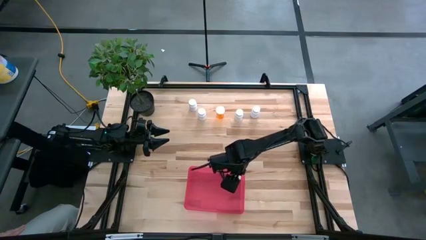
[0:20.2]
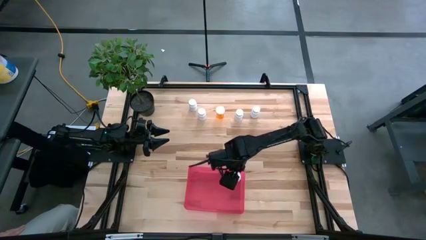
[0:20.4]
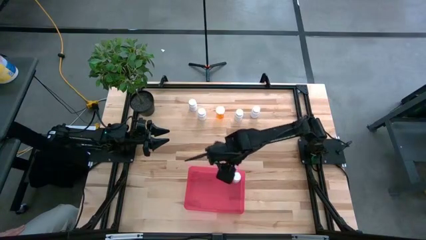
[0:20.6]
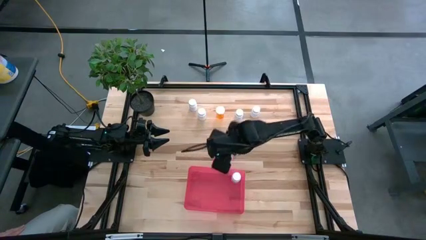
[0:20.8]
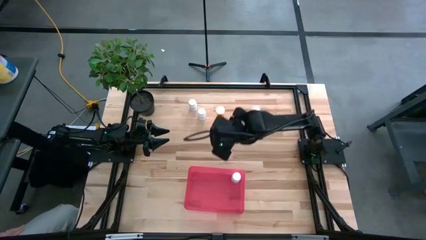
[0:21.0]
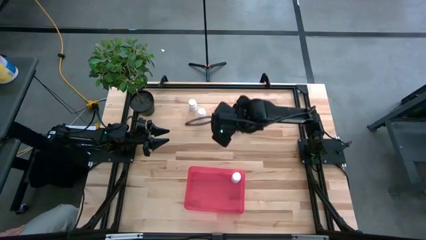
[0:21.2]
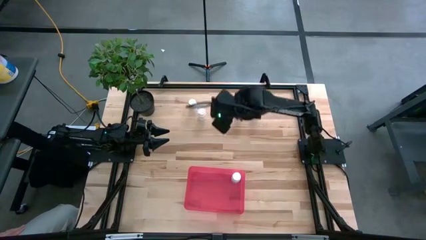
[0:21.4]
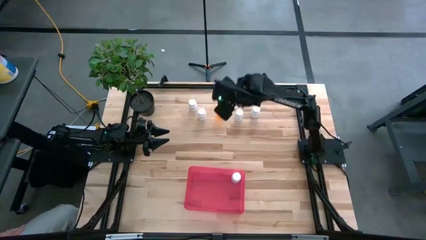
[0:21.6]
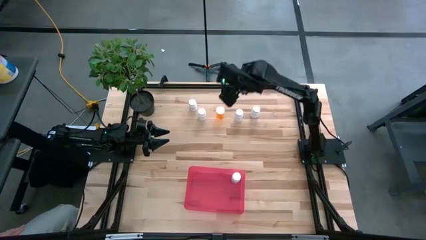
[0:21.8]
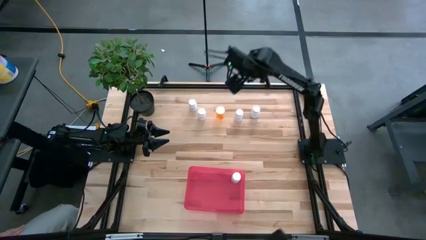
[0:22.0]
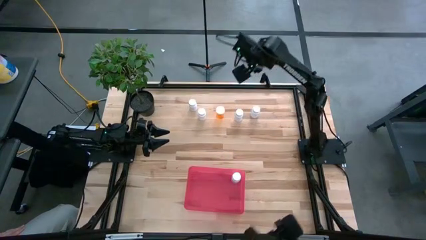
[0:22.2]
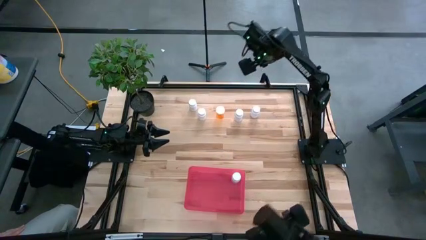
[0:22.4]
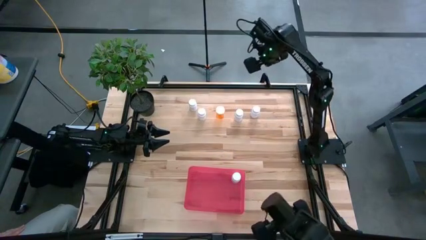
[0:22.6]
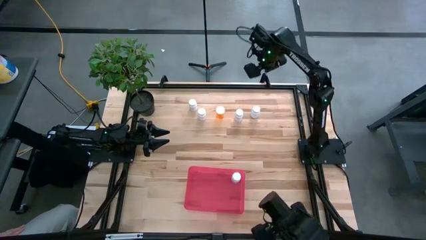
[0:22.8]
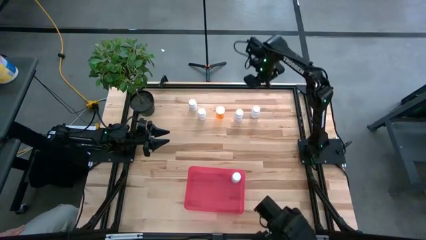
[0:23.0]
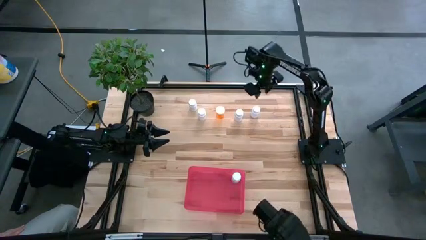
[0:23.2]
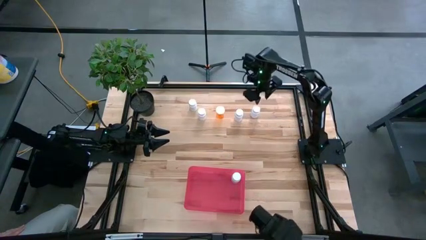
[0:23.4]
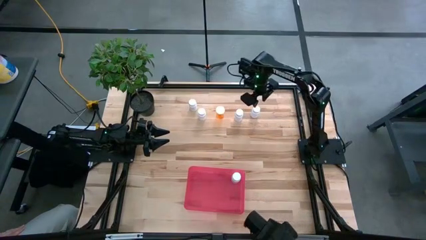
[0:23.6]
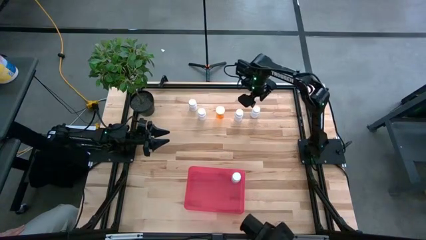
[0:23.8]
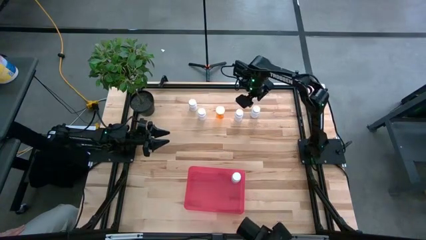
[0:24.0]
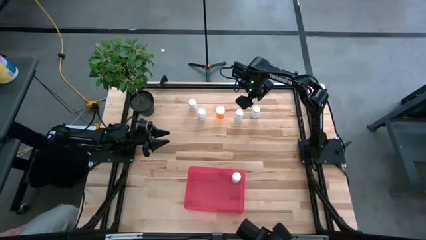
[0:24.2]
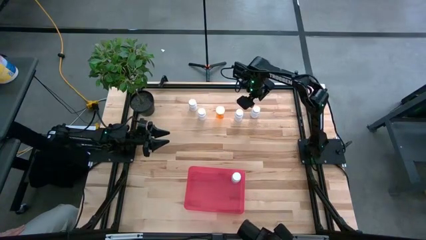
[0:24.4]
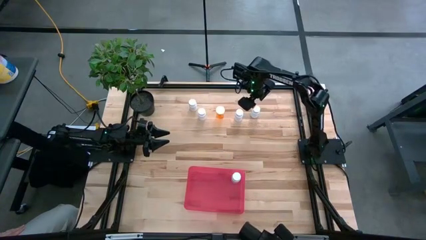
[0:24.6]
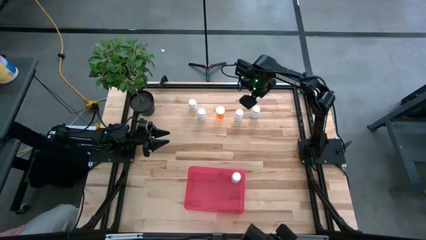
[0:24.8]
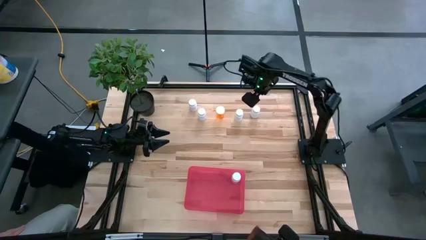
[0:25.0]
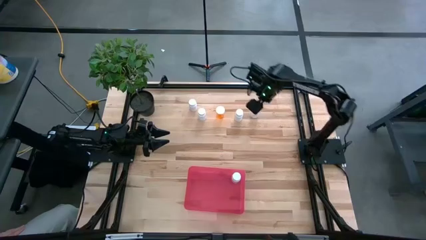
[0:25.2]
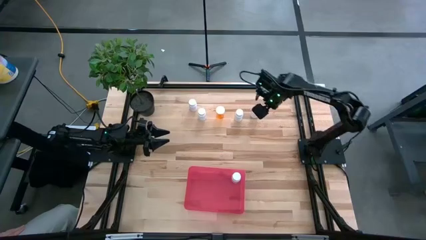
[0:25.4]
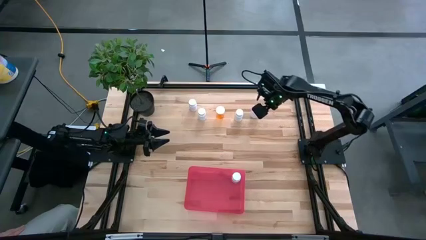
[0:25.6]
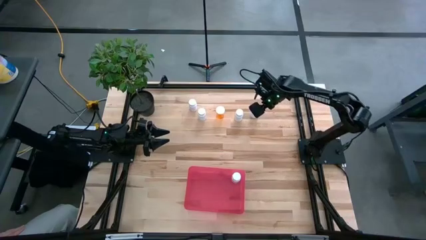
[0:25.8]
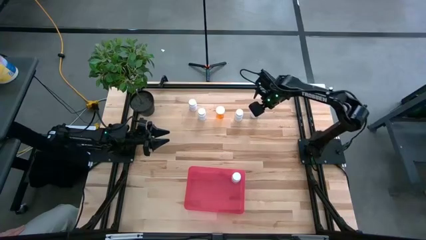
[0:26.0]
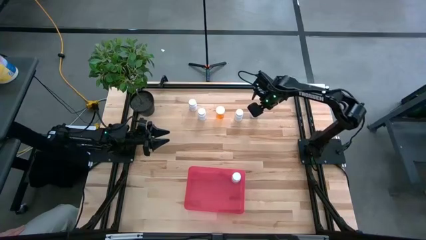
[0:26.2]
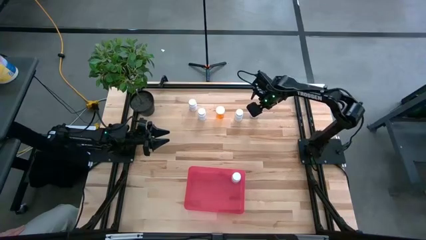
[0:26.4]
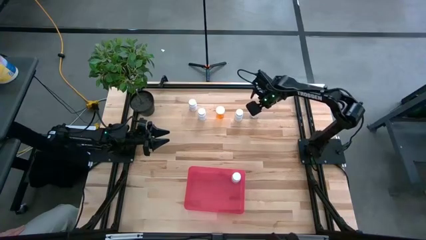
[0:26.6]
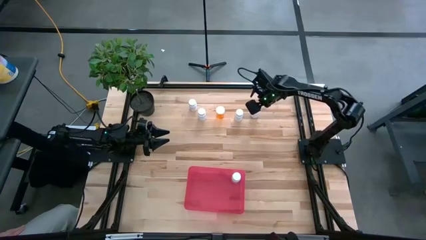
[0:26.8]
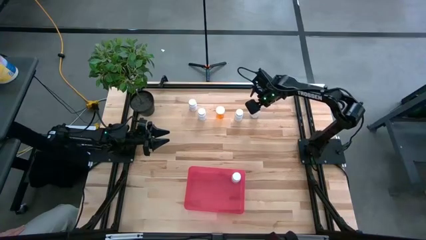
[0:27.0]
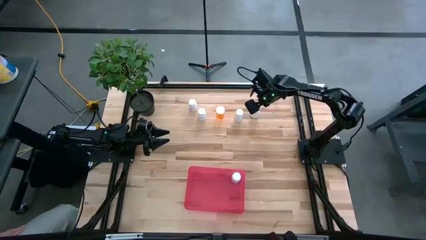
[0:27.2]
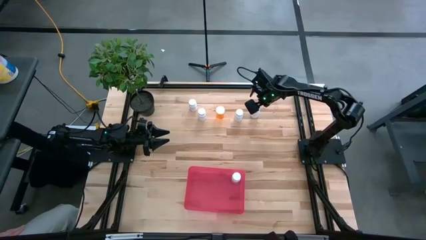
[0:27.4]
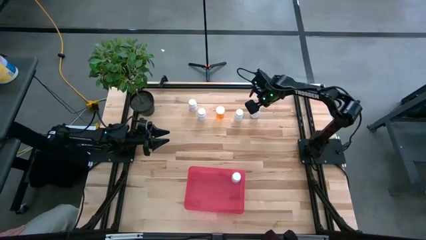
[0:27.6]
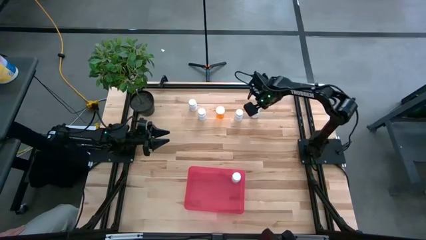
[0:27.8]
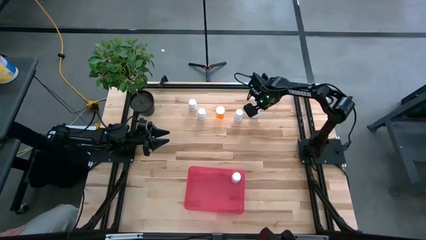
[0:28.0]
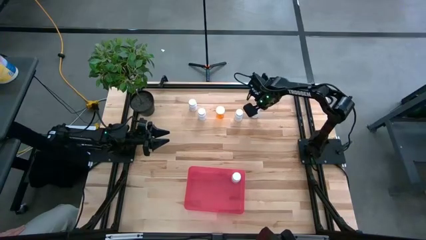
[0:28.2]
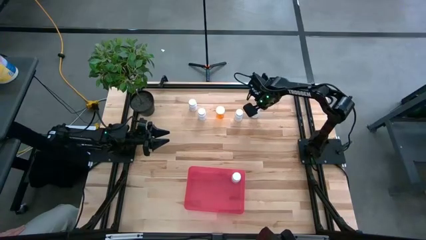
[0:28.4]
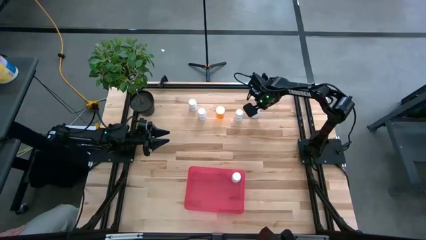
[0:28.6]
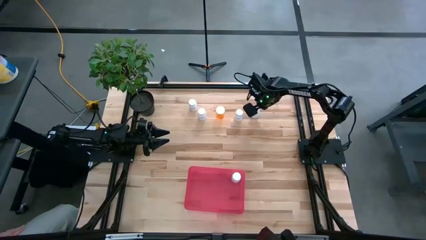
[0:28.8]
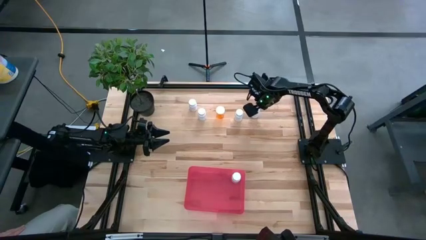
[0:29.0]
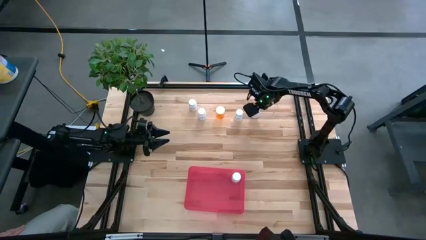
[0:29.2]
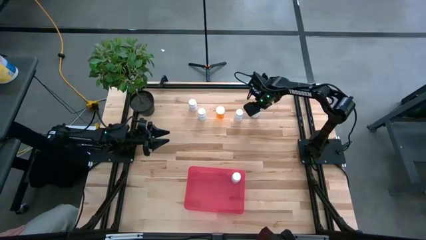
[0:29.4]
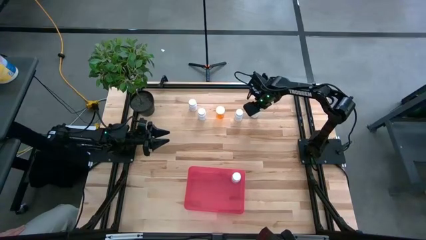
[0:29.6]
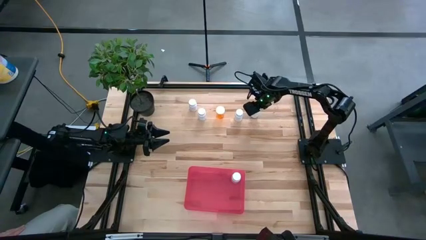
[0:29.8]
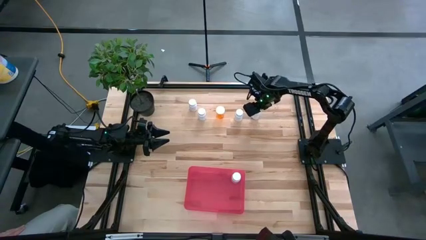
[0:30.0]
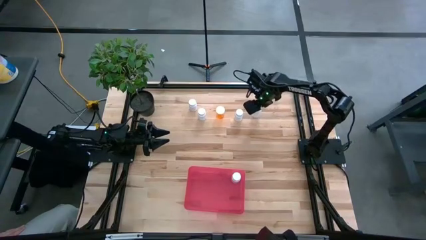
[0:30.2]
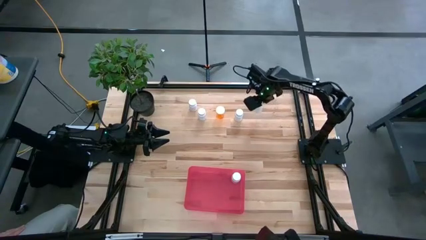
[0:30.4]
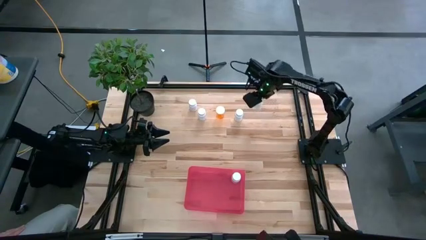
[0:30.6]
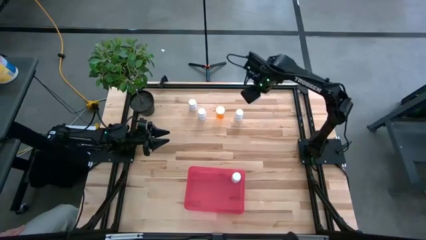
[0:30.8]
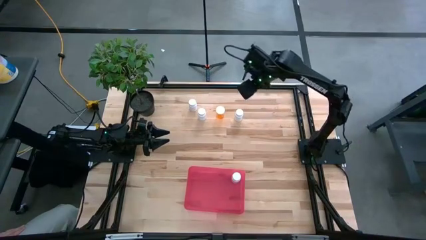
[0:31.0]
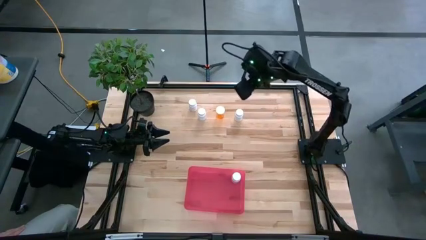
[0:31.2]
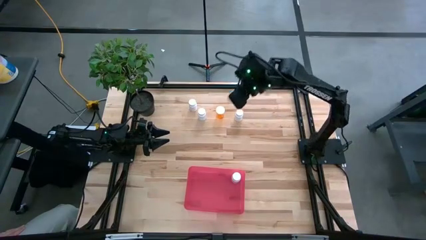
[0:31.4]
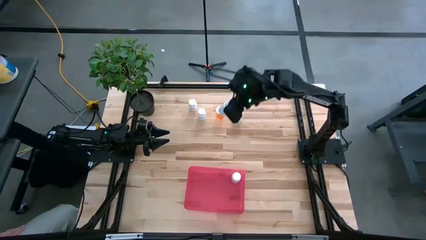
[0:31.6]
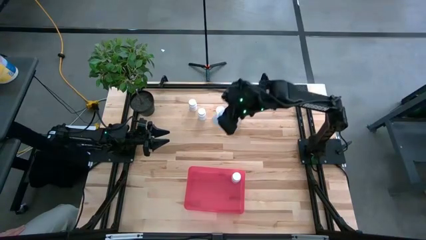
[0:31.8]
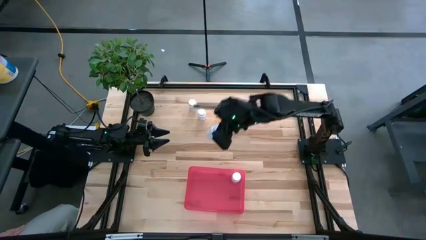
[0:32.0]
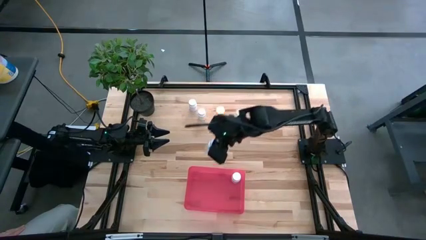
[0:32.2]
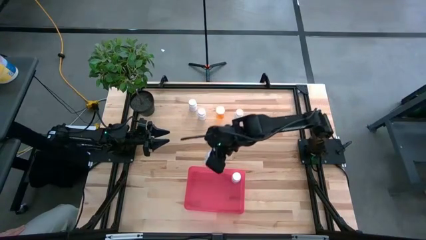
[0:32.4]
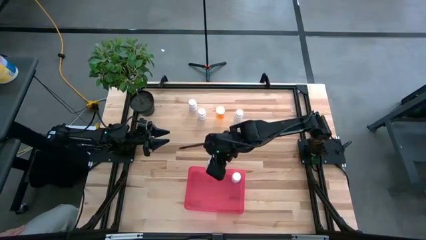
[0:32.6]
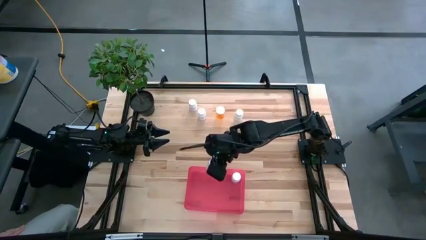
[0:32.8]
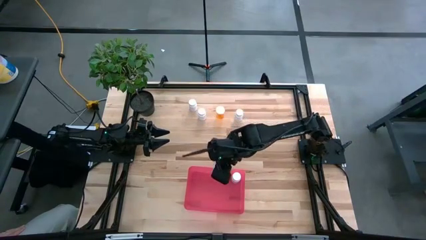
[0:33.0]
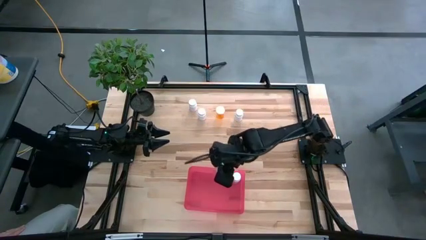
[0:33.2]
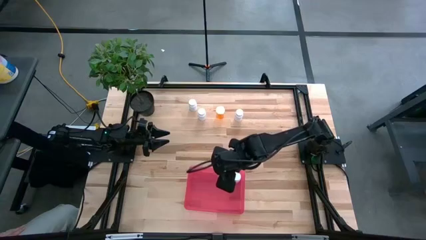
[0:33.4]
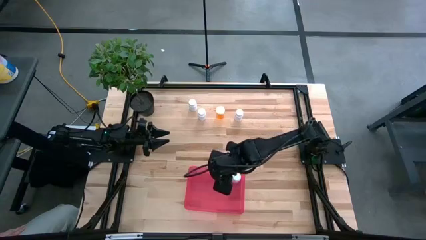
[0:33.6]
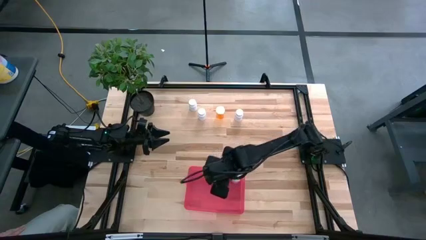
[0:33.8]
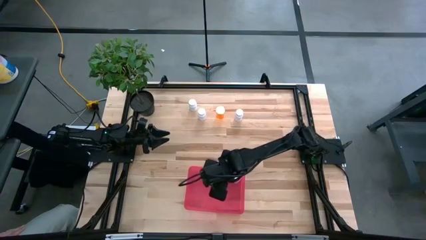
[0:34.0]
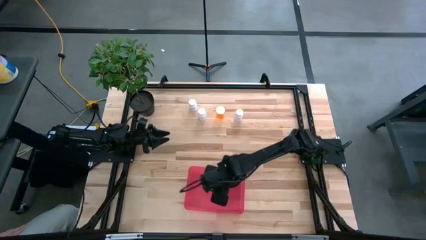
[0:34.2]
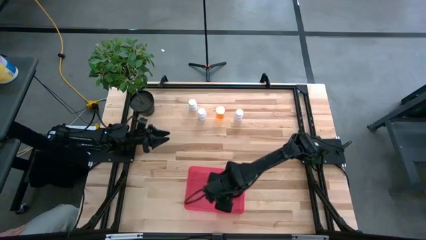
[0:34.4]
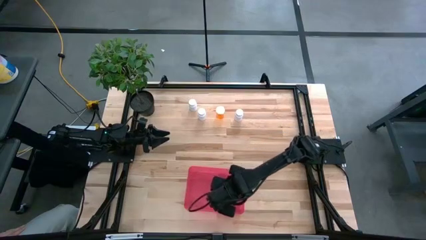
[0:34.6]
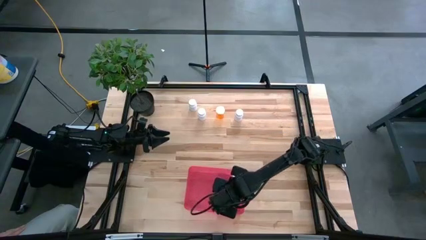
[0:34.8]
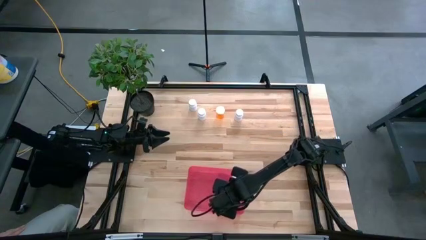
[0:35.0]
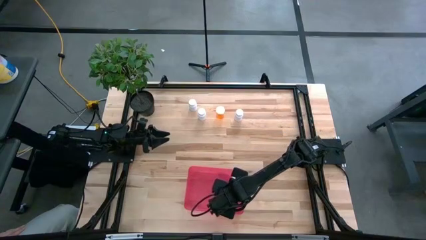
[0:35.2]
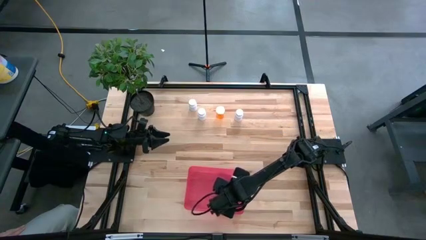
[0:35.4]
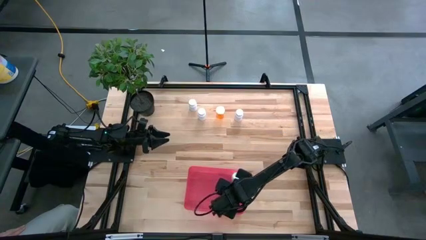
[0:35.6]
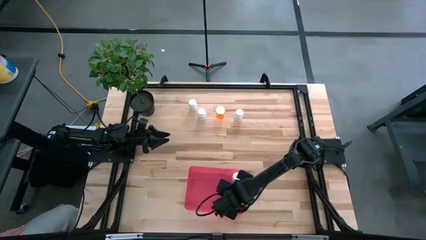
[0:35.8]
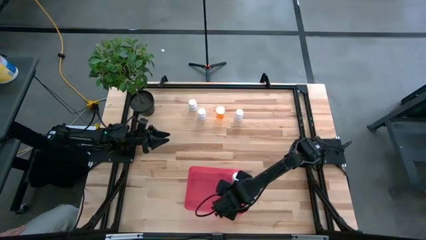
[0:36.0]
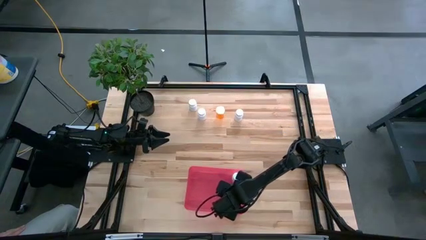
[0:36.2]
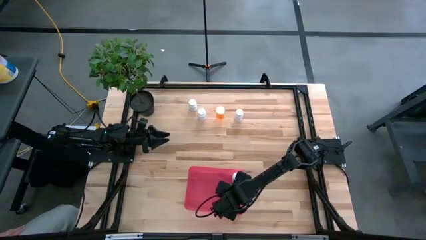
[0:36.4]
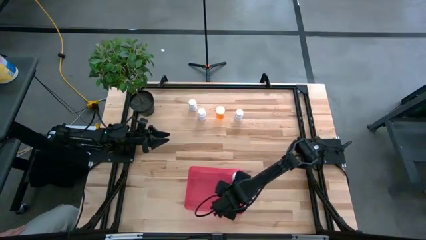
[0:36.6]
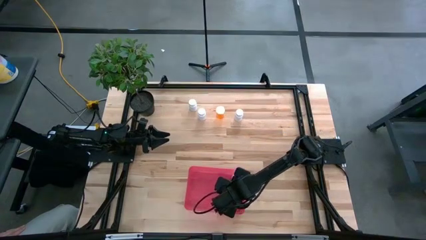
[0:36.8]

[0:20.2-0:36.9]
Task: Pick and place pill bottles into a basket
Put the white pill bottle into the red bin

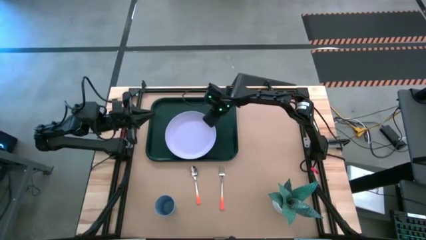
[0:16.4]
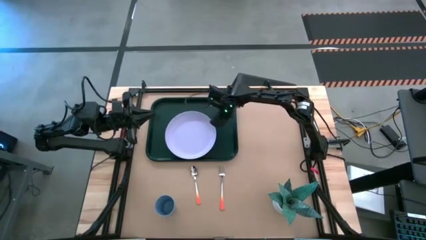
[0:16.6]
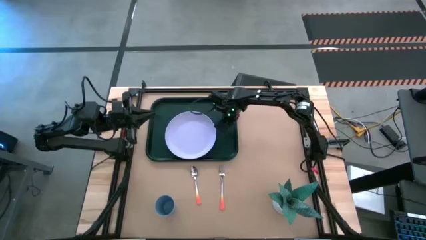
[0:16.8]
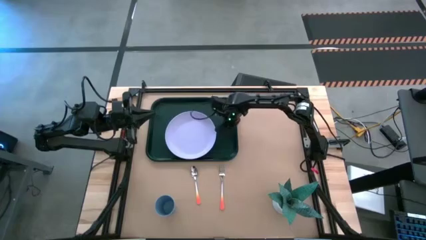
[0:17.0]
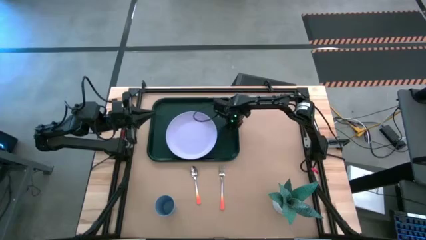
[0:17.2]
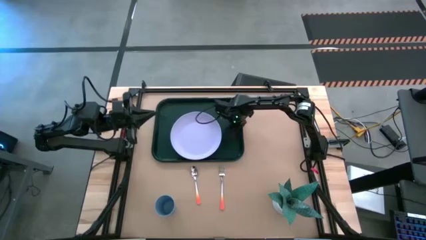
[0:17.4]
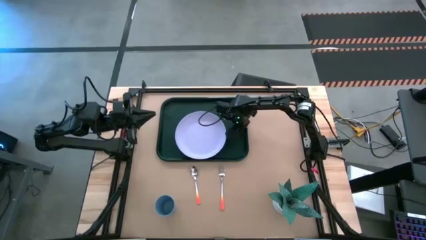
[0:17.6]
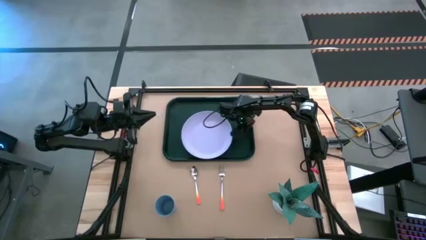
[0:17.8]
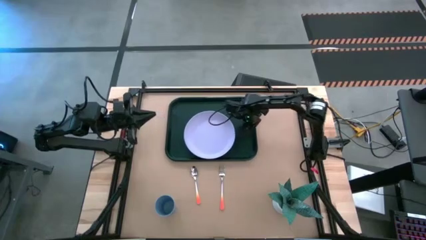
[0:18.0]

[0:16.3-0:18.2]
Task: Pick and place plate/cup/fork/spoon on tray
Move the black serving tray to the top middle of the table
